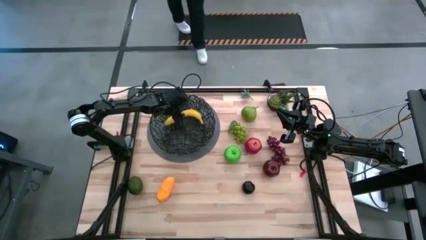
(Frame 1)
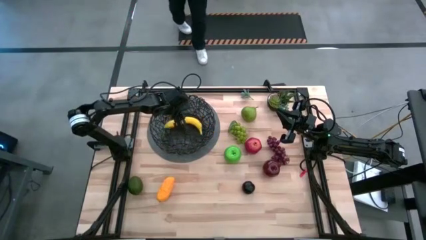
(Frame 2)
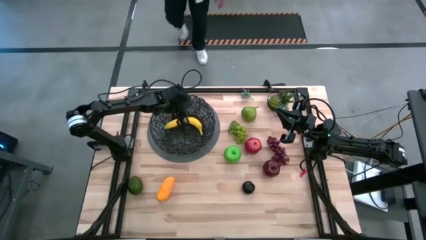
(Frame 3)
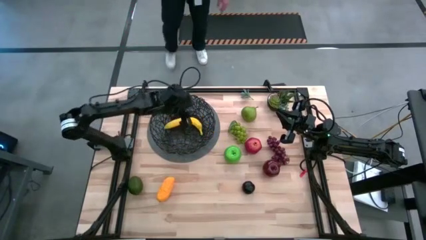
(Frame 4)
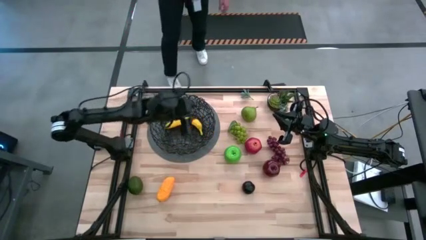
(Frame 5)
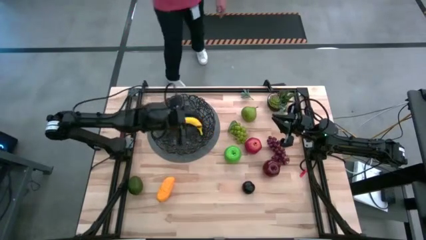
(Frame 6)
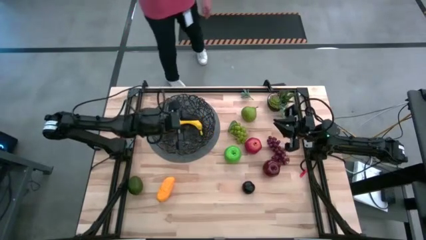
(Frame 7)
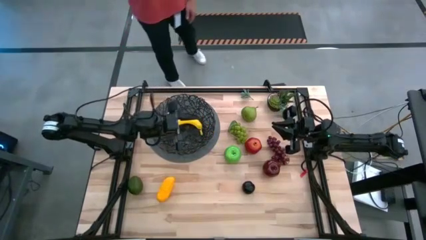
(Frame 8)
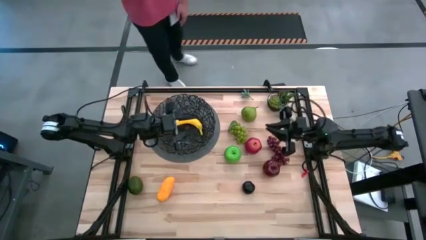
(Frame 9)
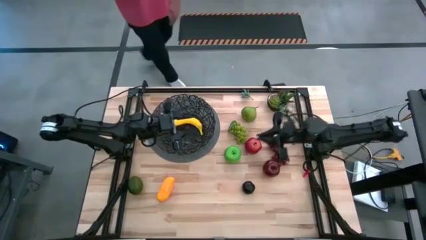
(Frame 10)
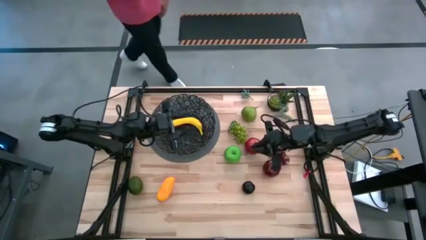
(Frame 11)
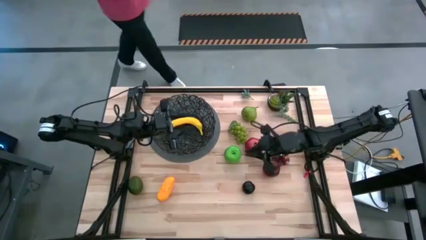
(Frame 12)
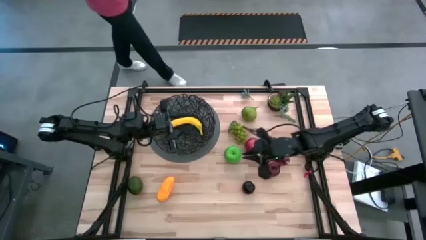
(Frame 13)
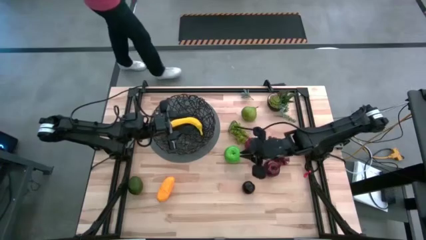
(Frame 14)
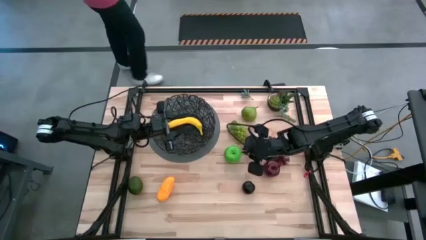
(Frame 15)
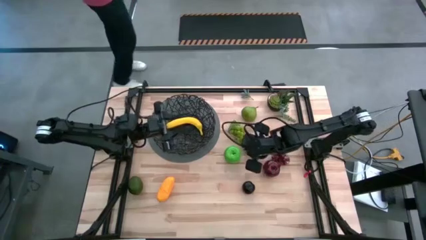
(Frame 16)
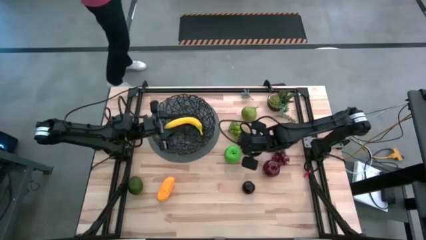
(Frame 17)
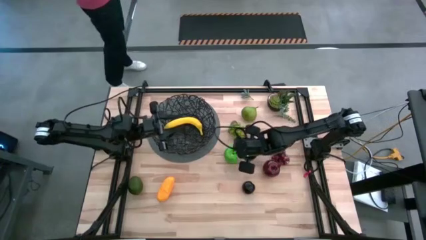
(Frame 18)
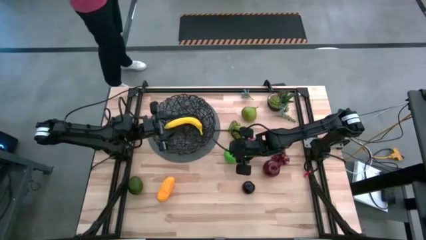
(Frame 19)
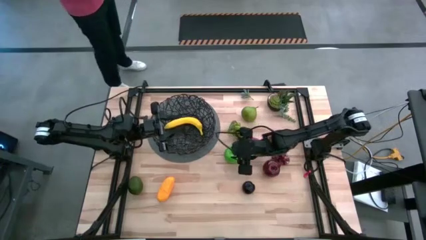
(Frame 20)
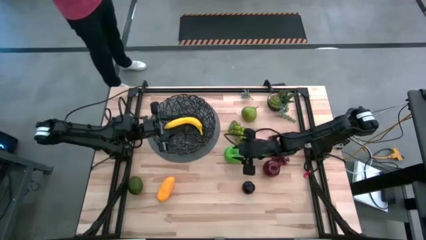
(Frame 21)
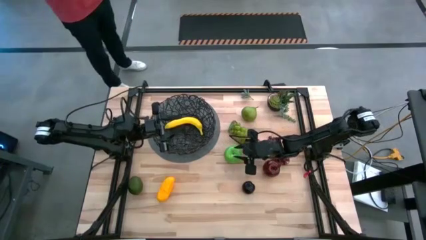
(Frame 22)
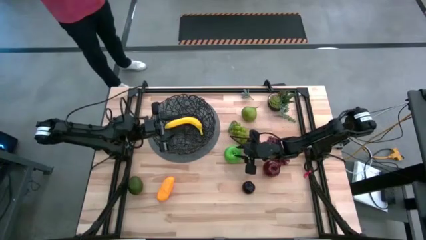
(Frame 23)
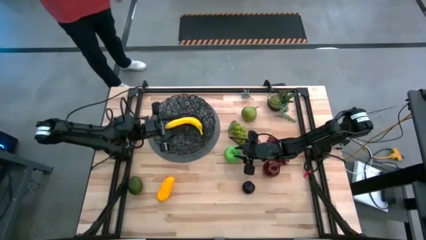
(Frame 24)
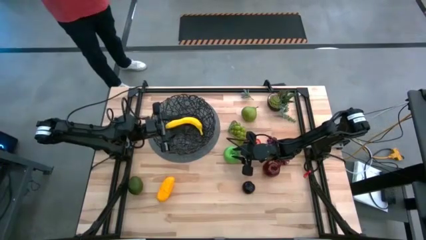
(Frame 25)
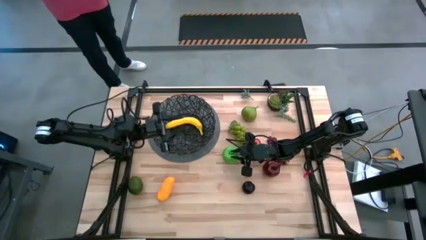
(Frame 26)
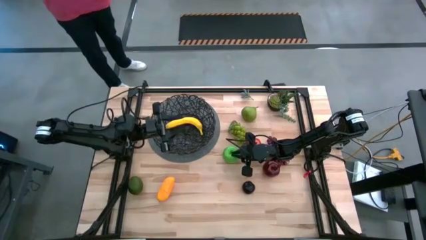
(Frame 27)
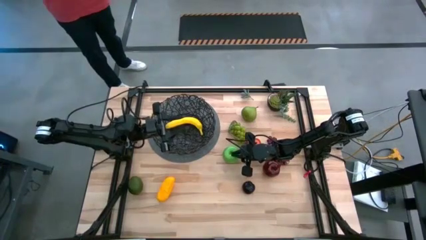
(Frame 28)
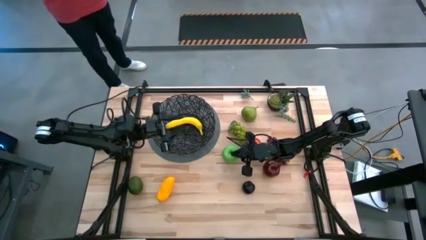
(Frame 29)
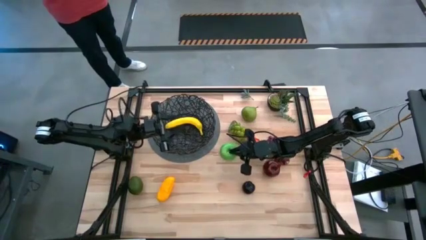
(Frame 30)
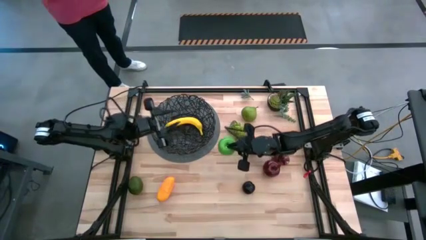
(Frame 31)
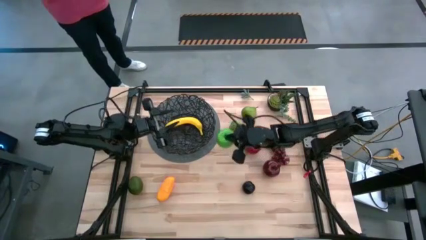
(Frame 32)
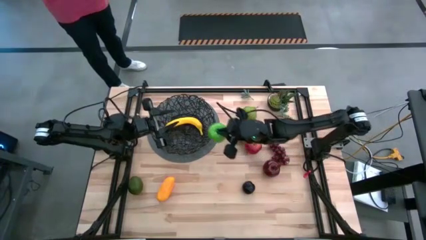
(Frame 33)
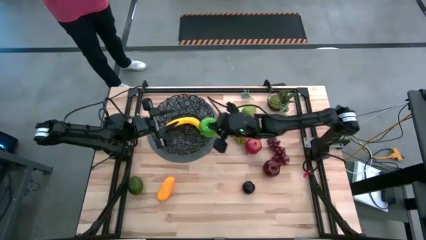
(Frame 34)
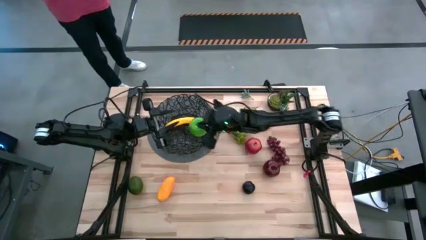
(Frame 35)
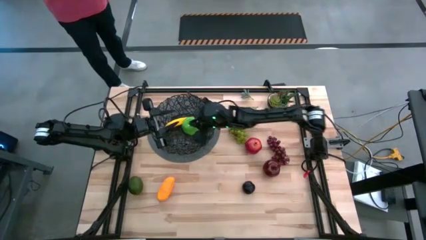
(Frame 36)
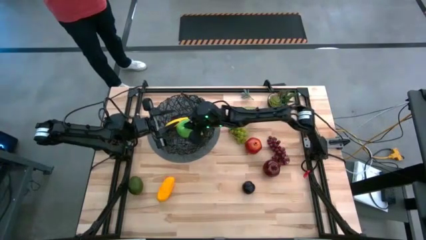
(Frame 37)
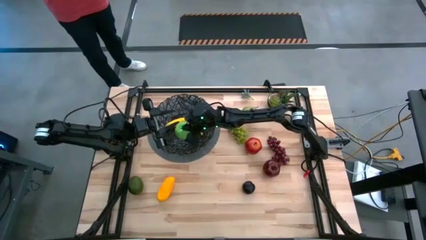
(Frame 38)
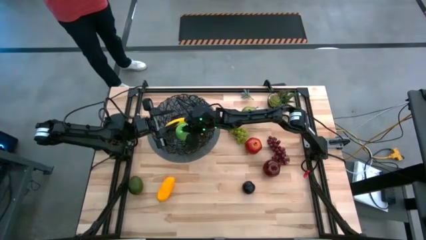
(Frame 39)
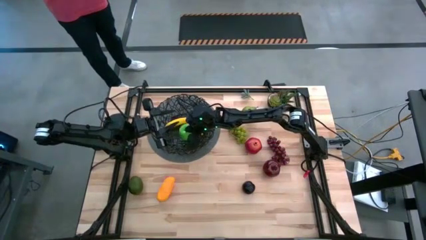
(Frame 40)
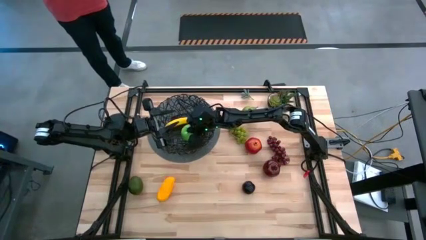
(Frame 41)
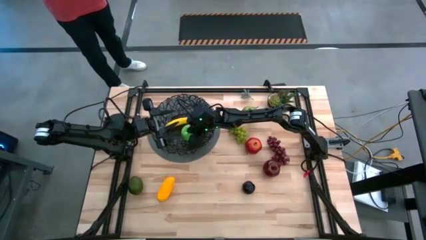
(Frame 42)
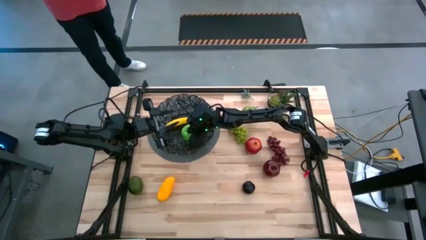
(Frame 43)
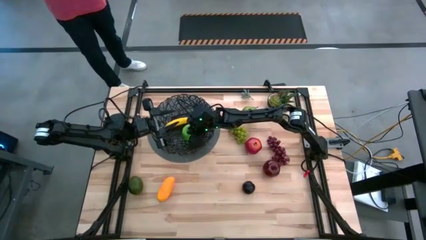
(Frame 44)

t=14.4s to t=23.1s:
Task: Build produce basket
Put the green apple into the basket

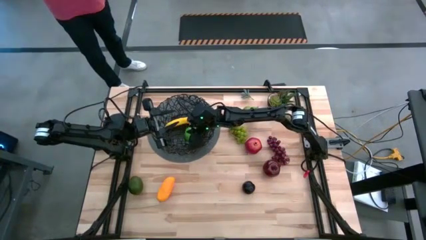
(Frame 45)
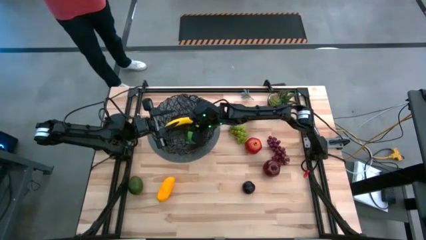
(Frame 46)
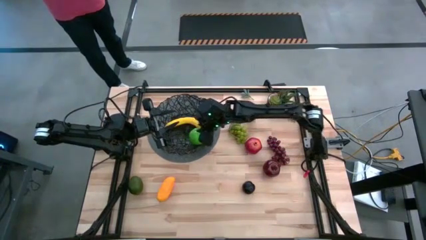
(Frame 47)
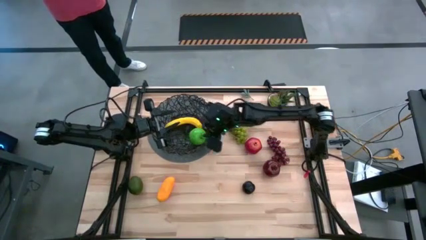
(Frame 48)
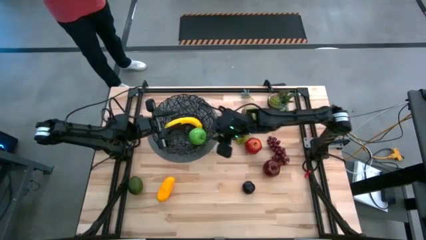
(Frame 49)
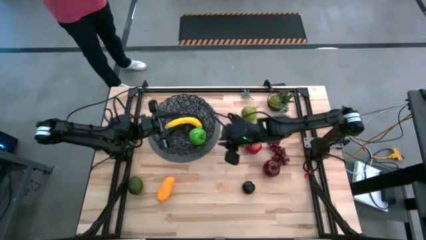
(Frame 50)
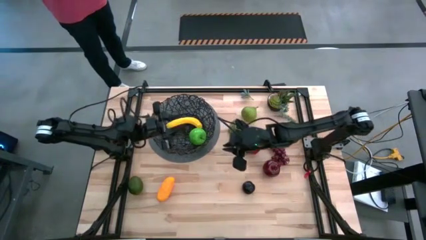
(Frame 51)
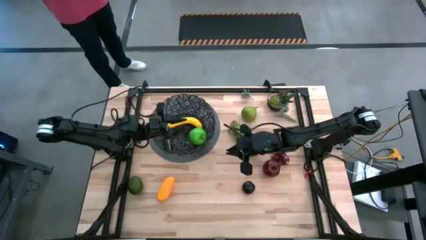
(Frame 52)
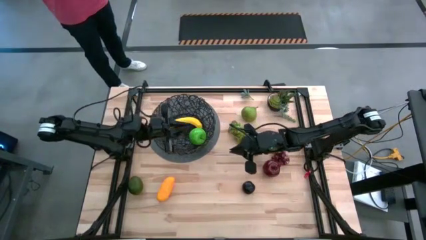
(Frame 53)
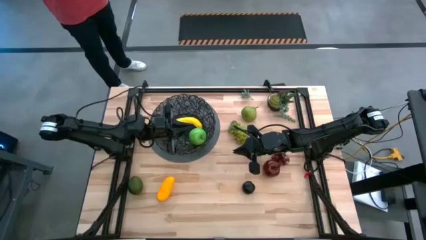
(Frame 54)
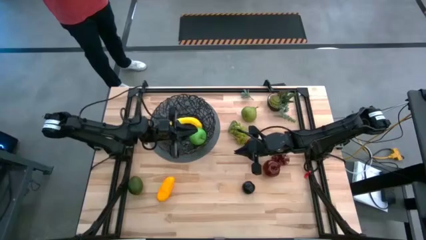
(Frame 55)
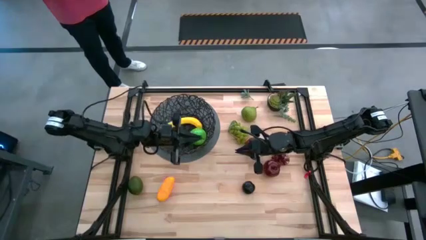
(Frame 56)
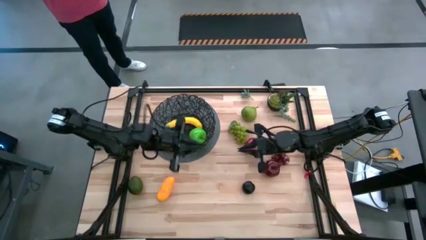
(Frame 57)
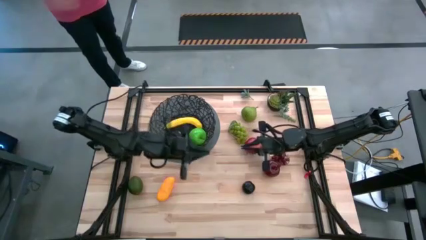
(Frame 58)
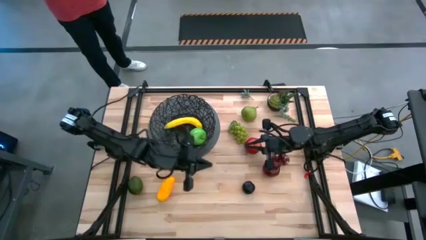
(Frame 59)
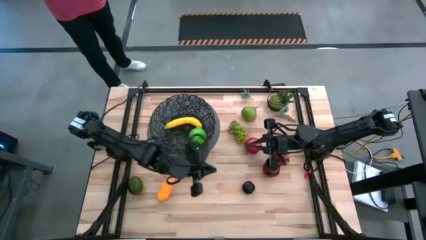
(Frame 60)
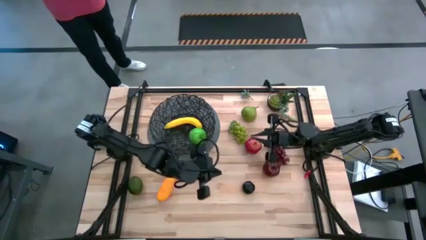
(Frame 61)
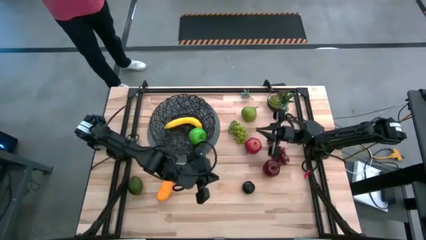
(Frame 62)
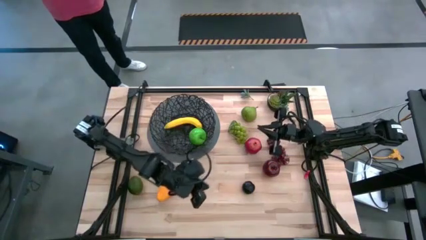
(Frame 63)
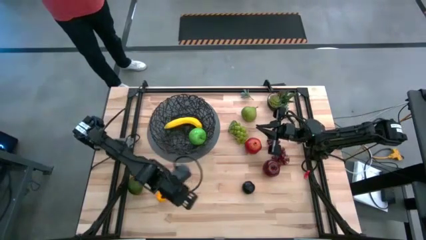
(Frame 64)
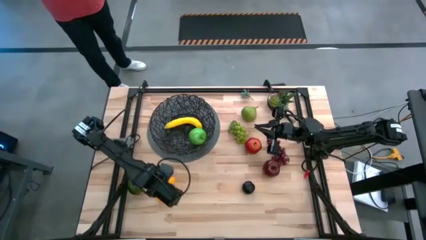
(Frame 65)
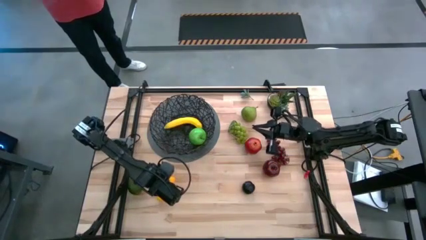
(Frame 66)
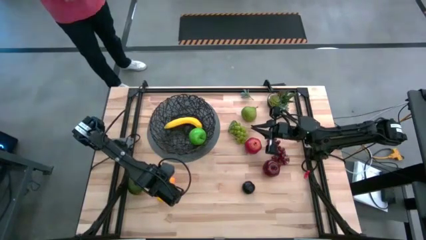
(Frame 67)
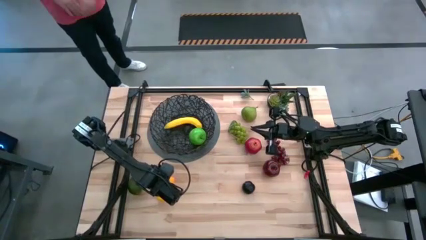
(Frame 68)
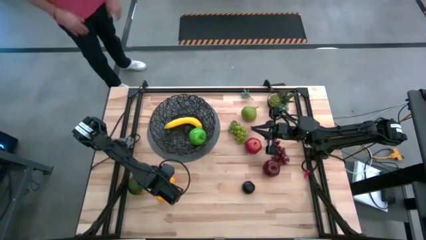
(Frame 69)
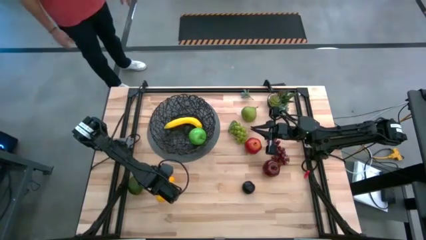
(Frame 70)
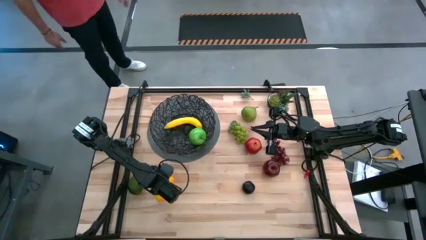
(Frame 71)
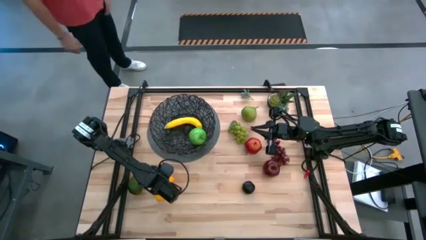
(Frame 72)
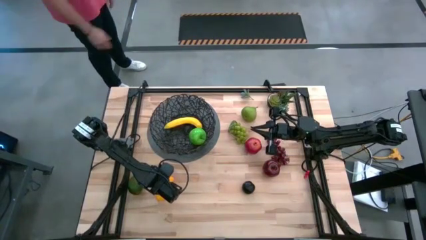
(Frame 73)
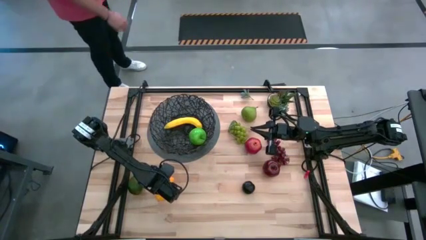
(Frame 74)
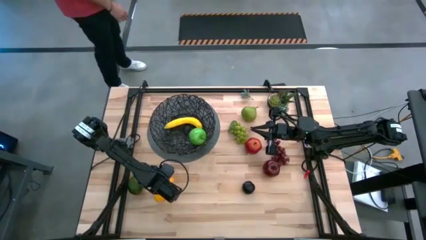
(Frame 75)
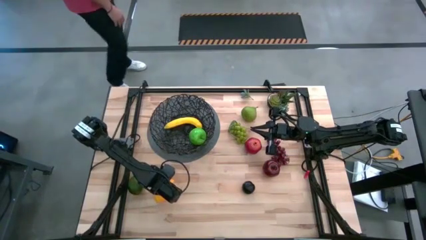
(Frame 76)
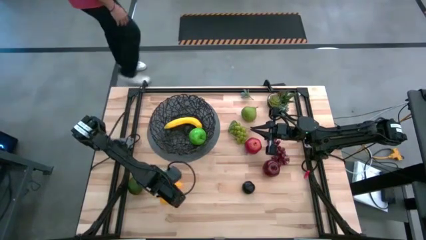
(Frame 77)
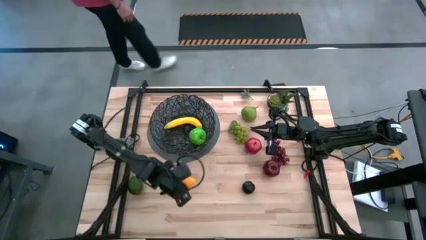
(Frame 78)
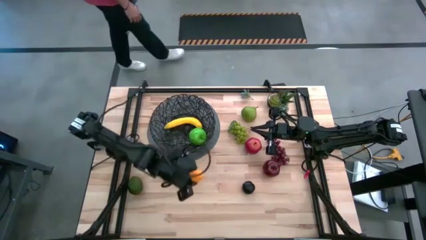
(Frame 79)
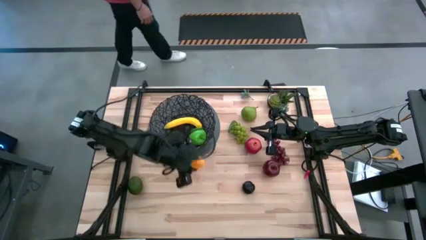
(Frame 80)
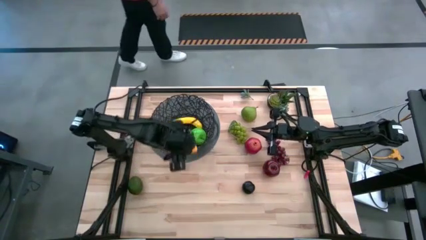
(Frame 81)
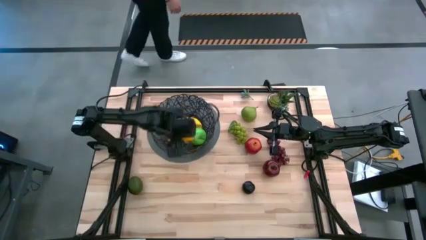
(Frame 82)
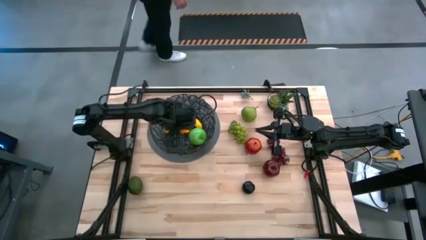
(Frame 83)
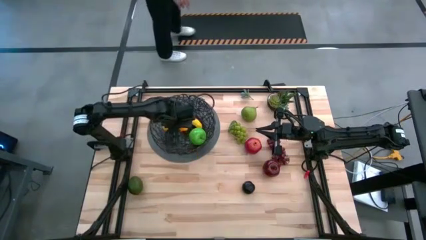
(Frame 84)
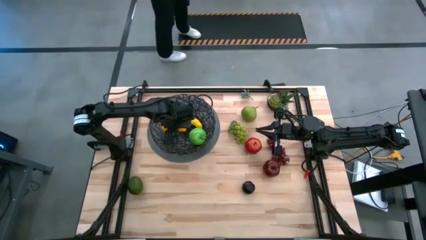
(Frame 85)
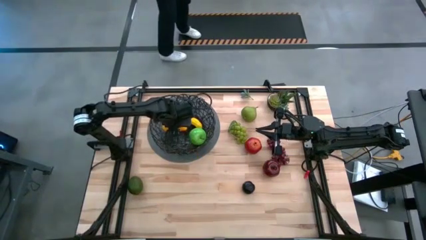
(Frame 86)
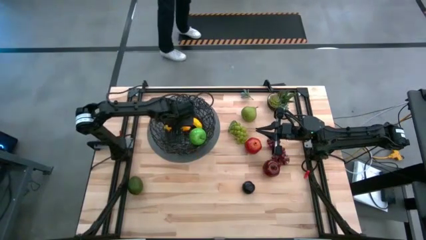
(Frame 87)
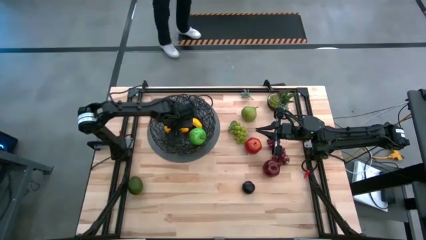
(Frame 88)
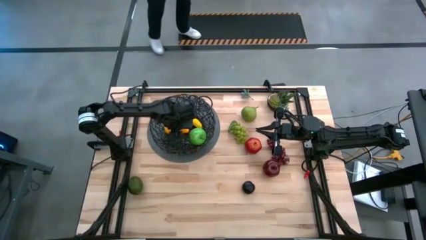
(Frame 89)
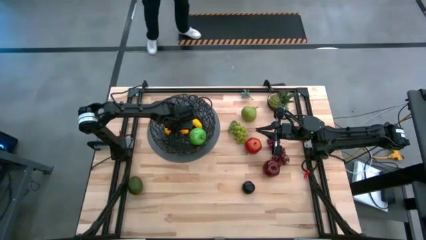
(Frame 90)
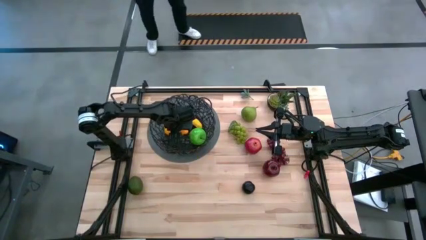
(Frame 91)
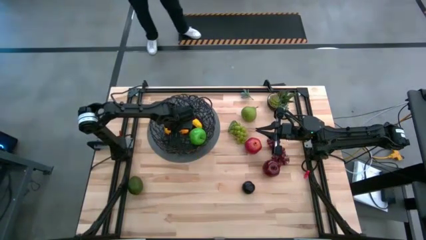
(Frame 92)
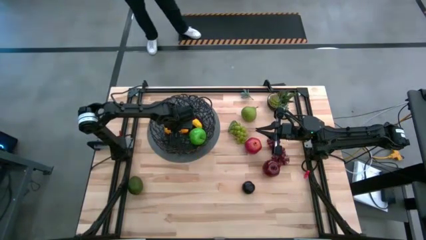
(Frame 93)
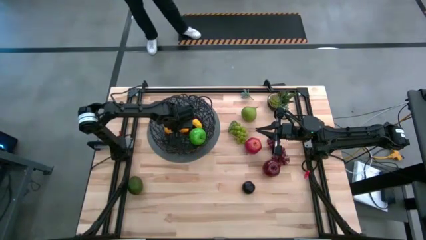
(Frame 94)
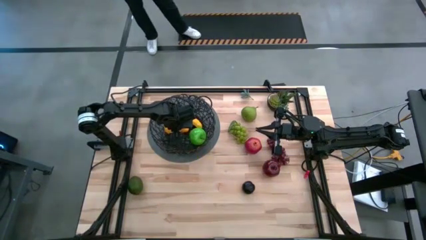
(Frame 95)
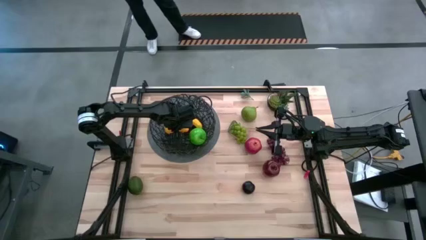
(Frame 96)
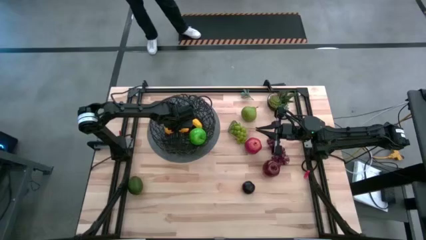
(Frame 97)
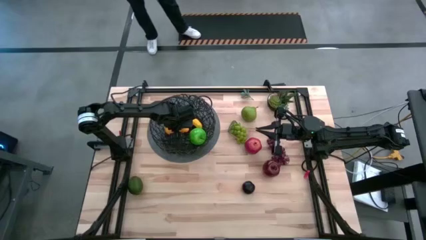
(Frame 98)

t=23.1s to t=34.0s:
Put the mango into the basket
